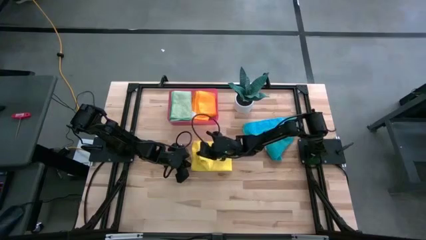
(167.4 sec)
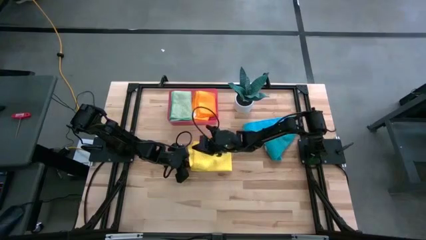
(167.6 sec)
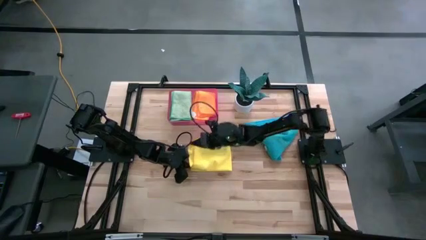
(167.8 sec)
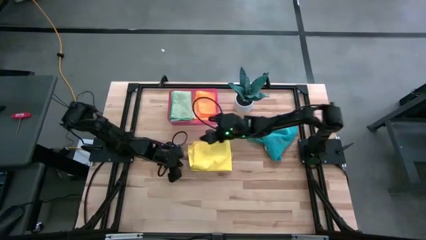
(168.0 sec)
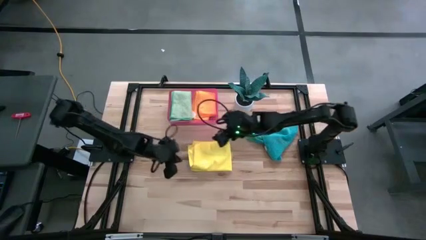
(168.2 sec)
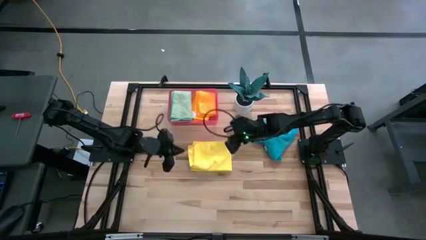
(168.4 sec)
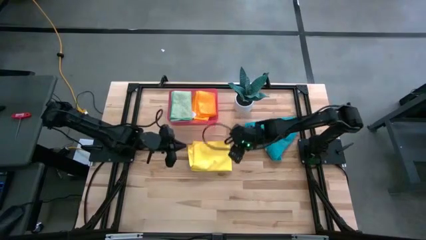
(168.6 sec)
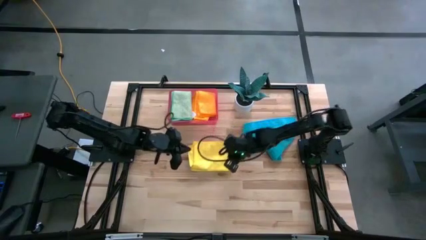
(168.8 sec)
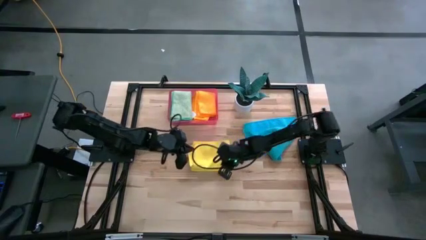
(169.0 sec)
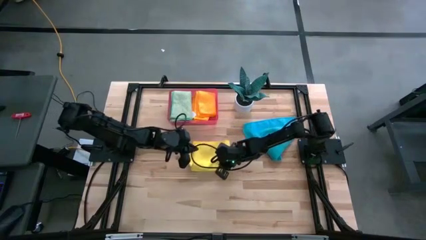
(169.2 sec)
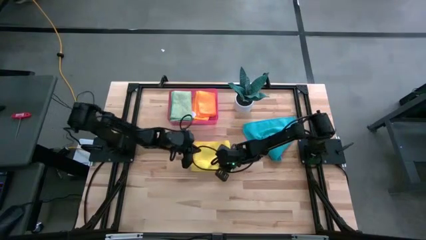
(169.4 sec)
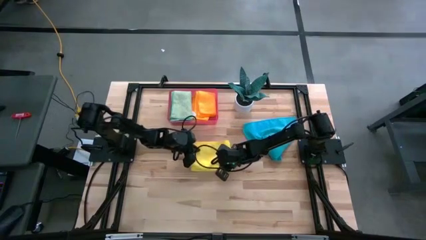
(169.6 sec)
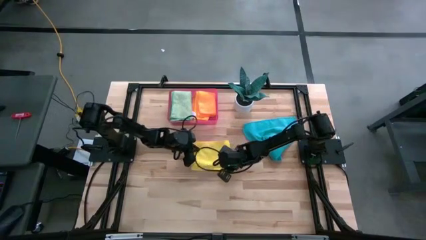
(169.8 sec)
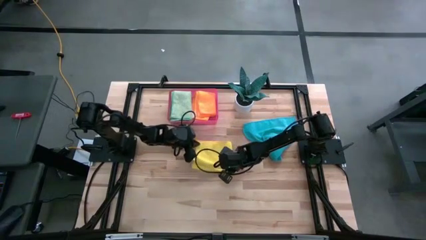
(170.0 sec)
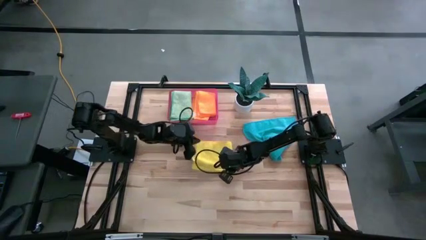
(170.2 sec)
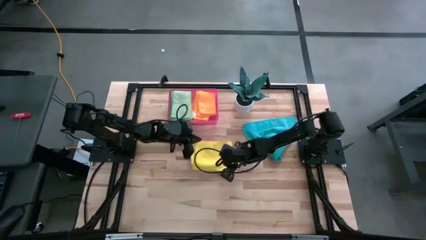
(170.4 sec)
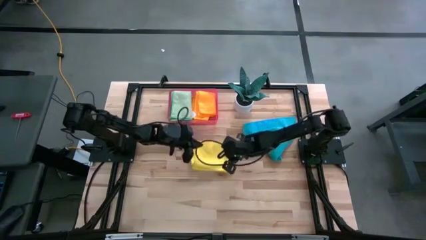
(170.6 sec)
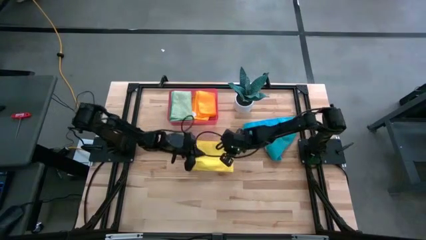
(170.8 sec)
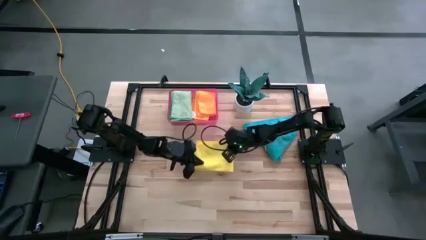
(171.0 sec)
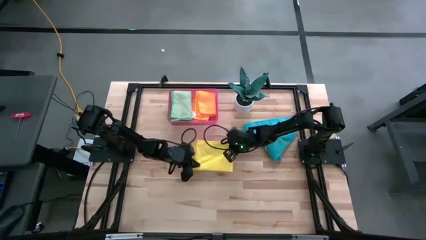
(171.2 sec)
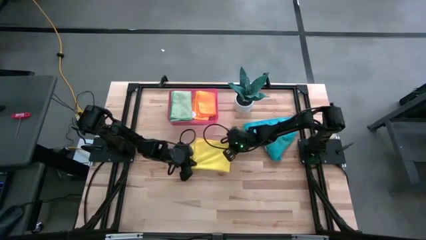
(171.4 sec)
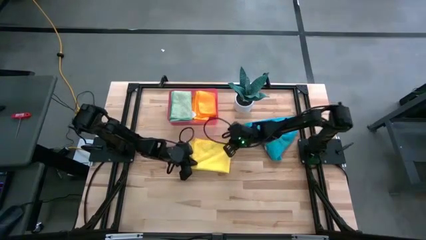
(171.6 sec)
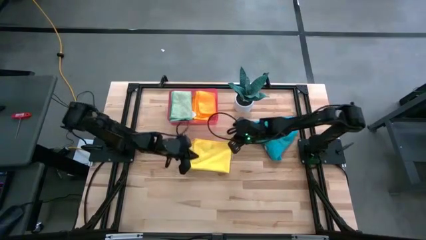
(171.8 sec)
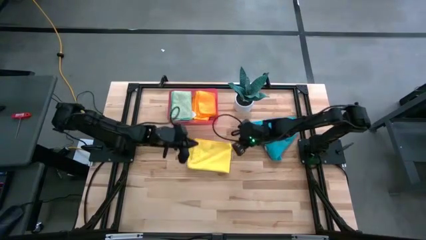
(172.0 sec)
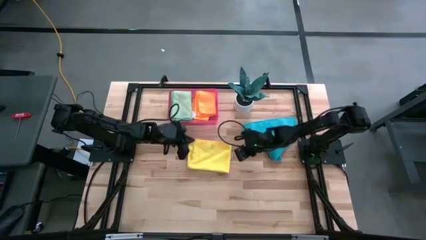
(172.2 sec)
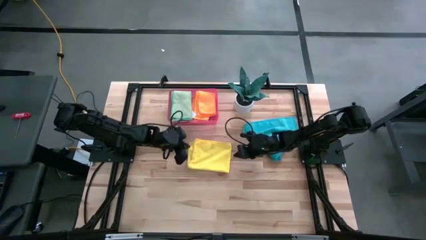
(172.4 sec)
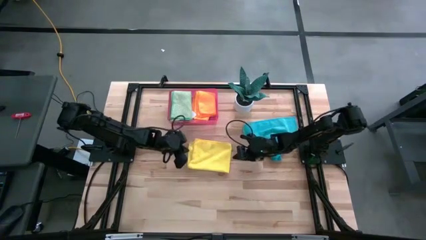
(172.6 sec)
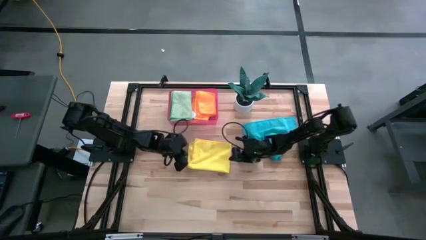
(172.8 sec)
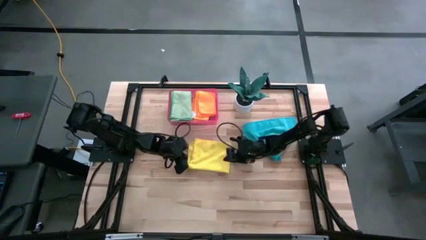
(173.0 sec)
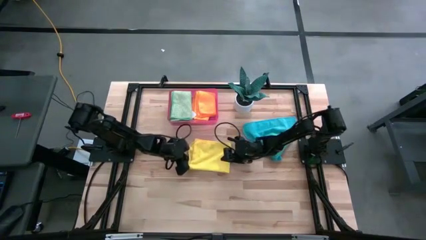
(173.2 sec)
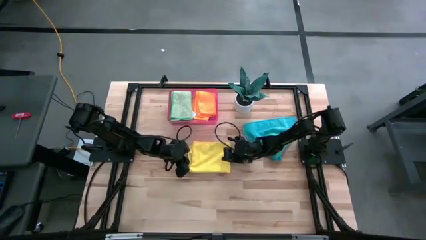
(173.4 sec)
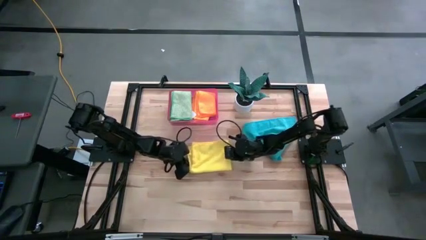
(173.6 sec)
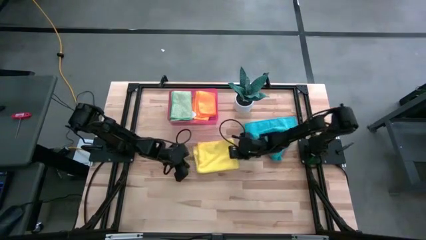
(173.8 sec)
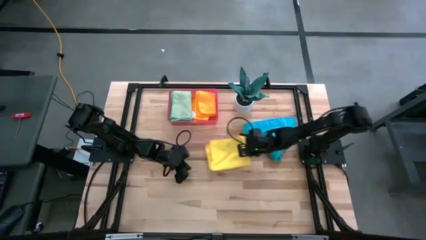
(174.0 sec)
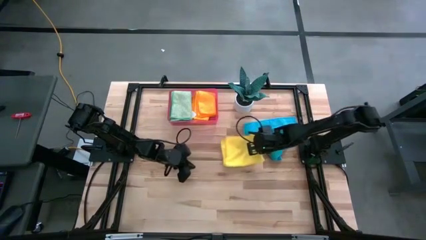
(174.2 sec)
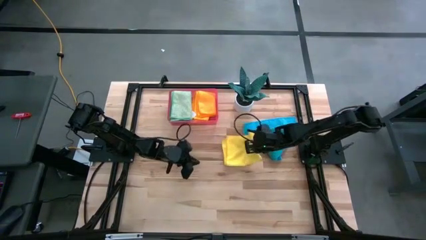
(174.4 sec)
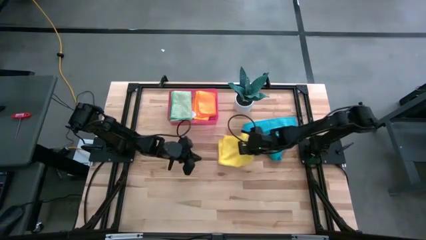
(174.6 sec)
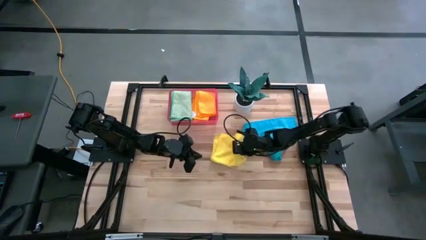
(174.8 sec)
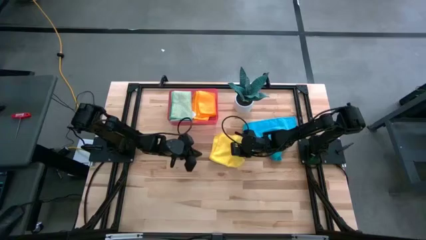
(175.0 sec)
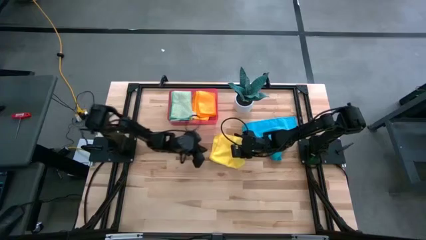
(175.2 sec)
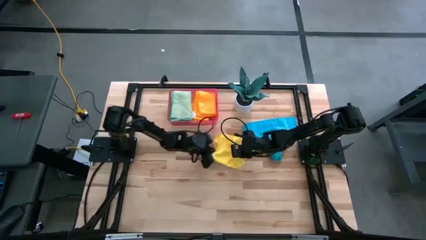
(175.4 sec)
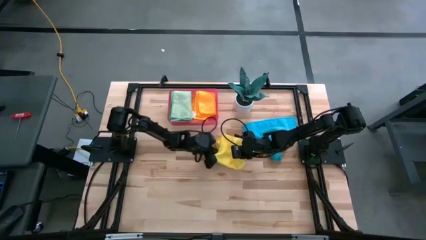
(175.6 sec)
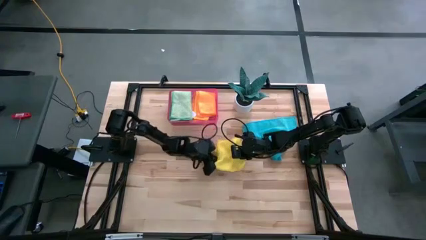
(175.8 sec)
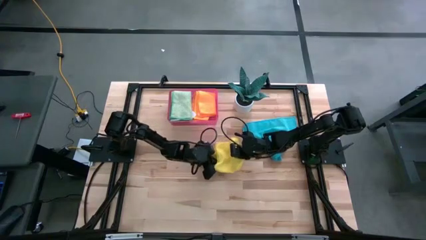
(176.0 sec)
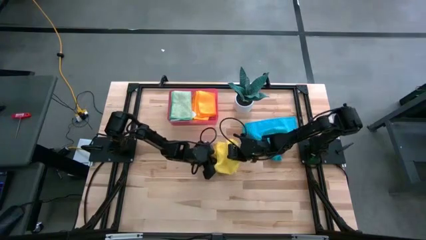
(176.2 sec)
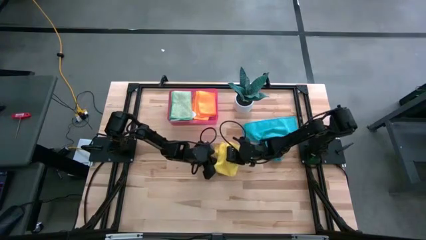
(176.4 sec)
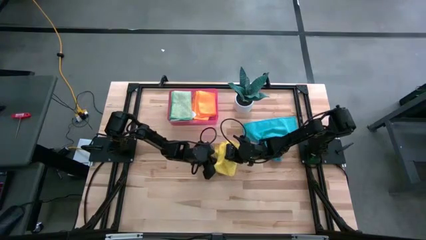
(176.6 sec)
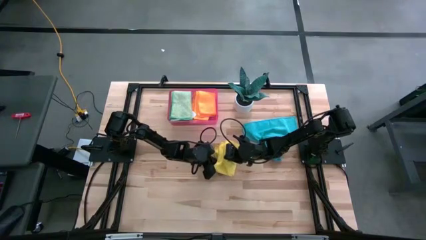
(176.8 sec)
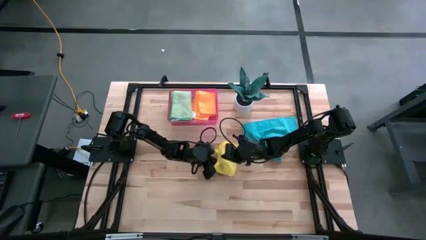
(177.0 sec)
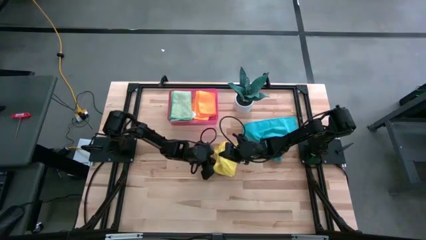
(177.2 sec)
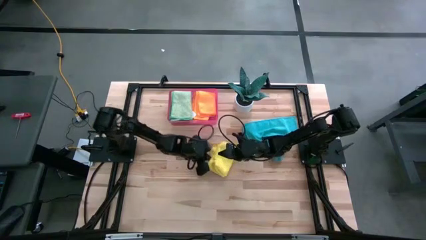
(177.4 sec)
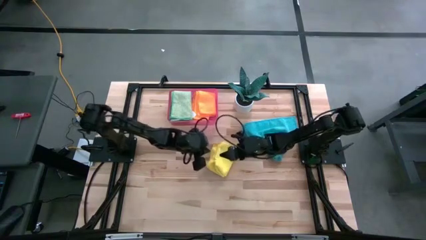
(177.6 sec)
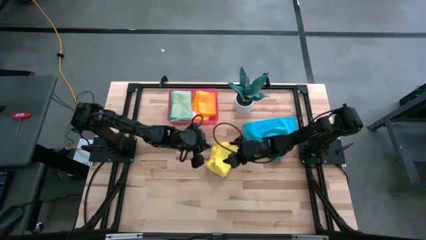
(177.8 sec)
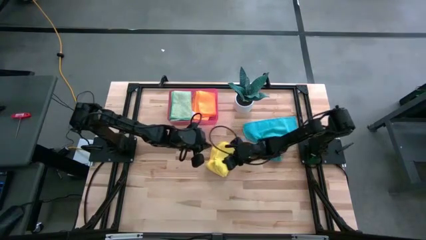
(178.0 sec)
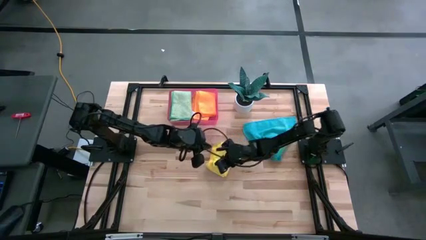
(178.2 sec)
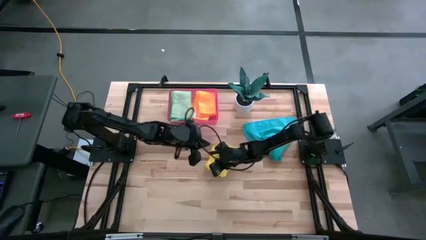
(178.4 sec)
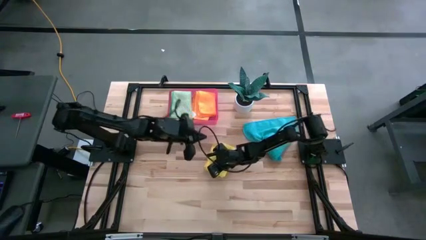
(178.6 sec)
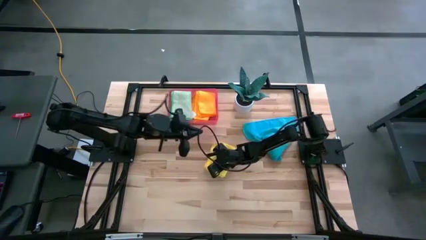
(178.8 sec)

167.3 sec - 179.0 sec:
Task: Fold microfiber towels
Fold the yellow microfiber towel

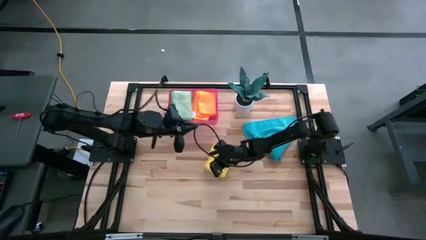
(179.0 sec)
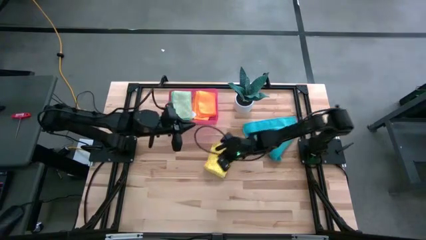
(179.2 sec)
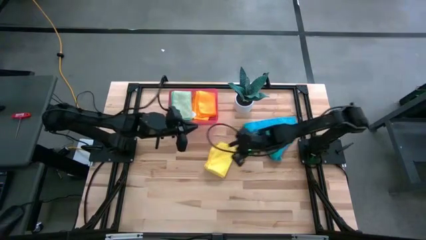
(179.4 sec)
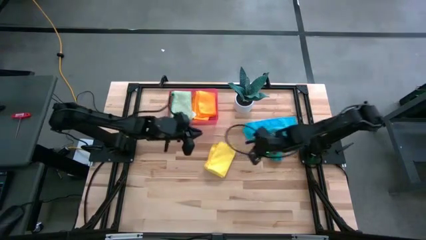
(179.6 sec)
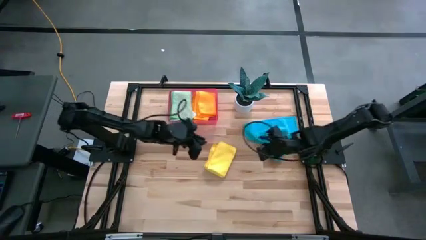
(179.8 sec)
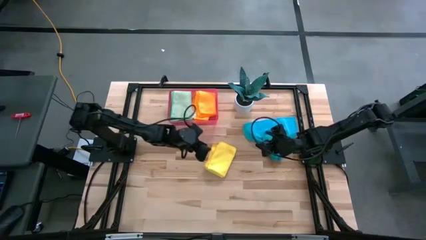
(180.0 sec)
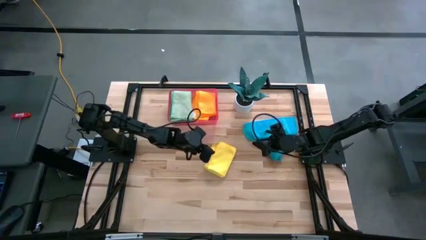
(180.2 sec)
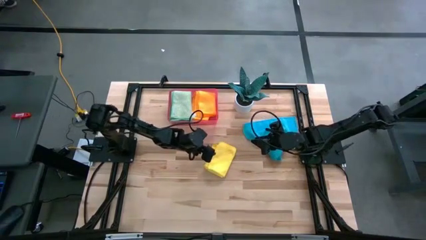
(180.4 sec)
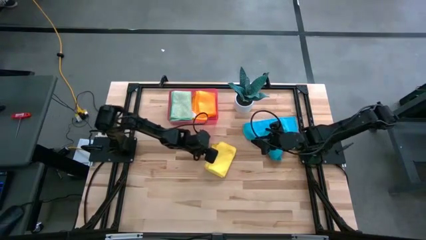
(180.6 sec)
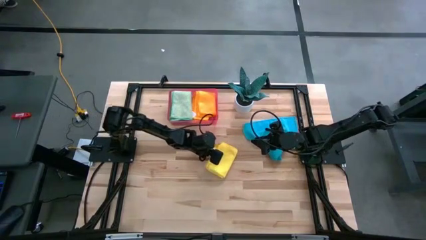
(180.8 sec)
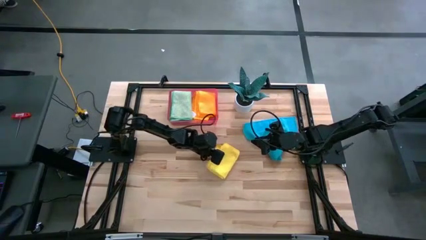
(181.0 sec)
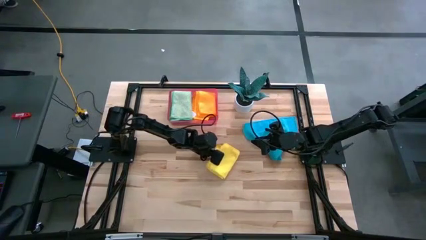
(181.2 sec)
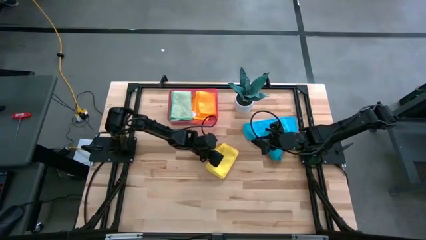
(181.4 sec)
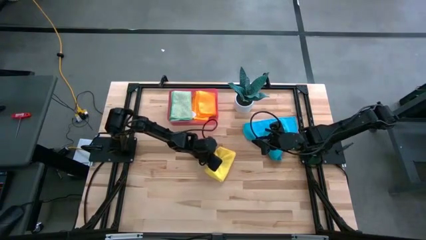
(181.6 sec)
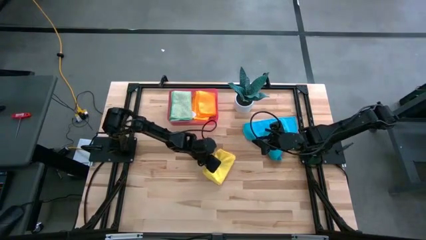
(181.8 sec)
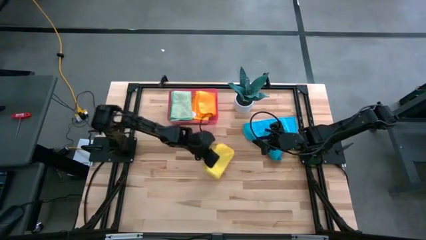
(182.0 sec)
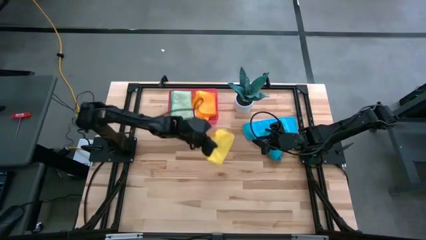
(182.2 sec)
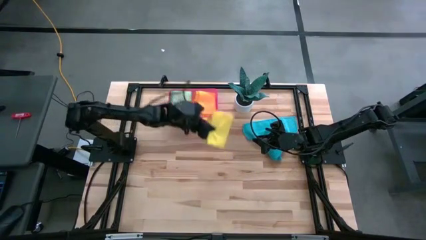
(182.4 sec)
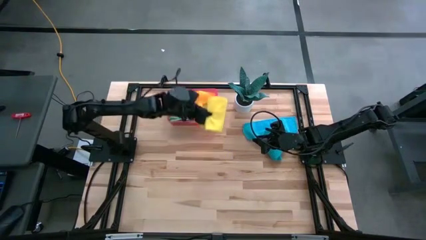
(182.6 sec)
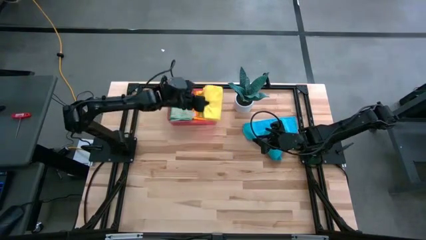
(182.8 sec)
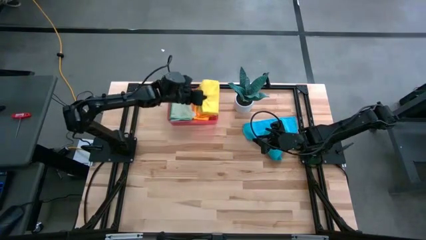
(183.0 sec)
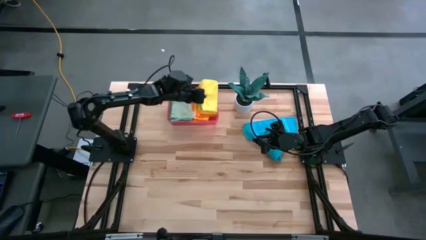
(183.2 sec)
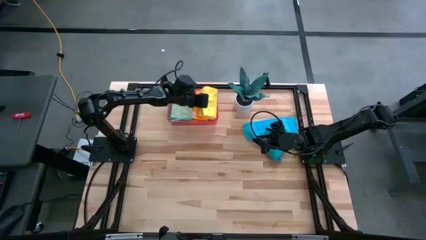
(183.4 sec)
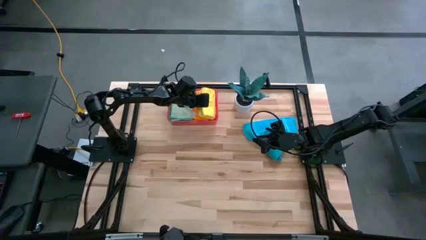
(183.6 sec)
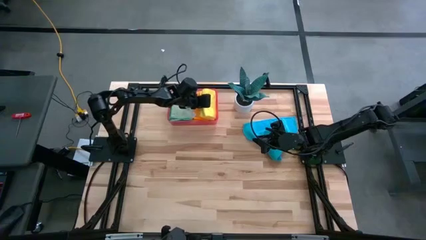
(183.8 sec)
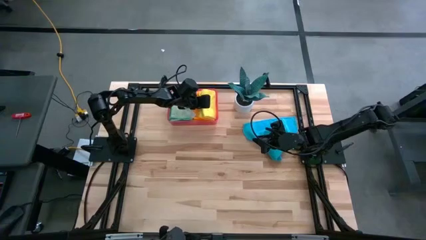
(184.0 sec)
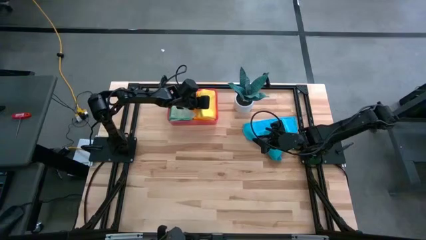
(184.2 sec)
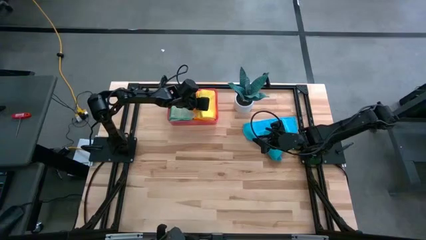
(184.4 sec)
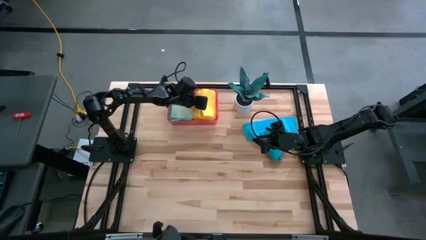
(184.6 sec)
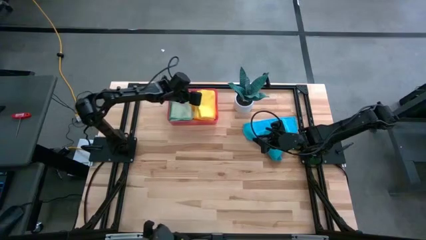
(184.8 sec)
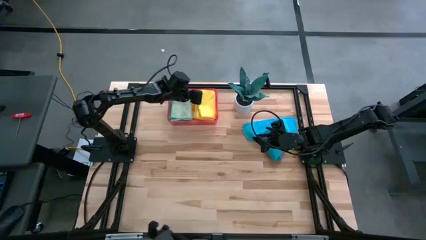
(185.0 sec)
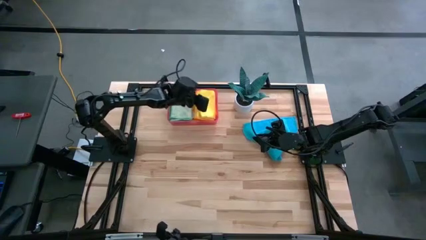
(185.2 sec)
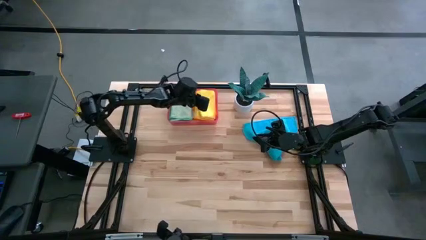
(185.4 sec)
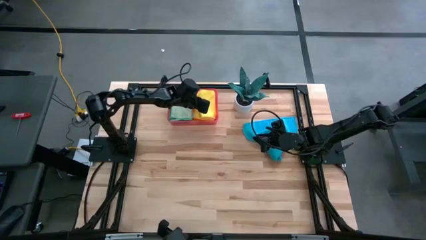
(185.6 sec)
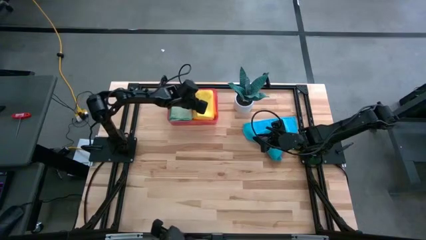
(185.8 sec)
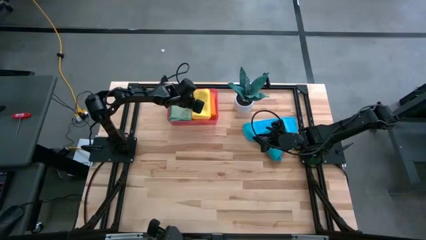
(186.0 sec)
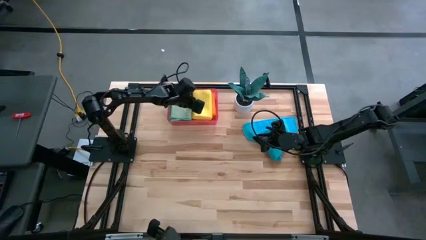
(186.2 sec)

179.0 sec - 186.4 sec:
Put the yellow microfiber towel into the bin
